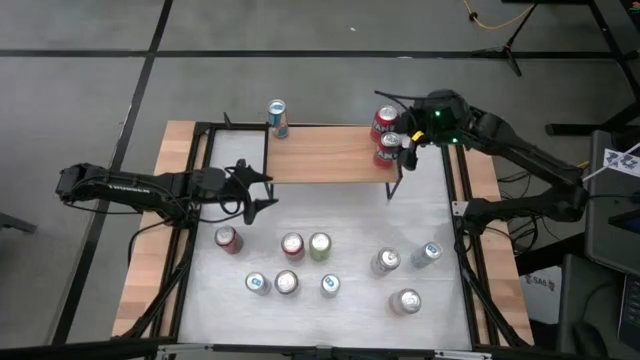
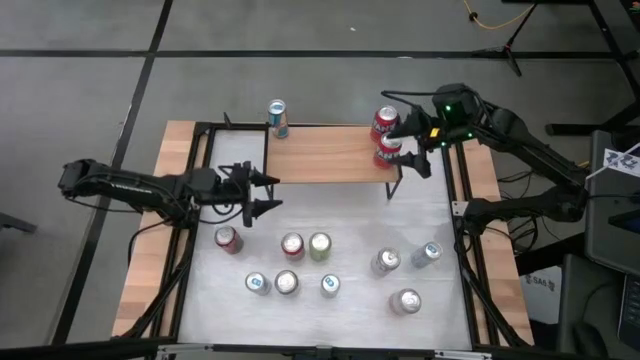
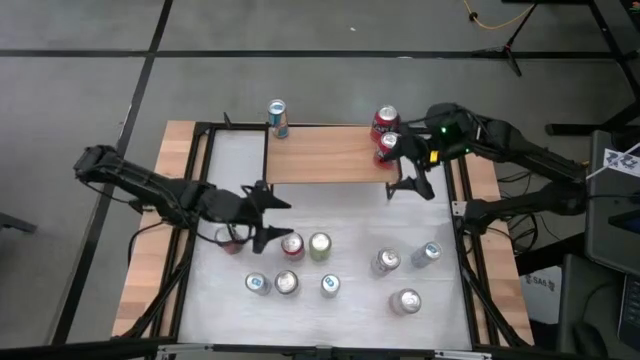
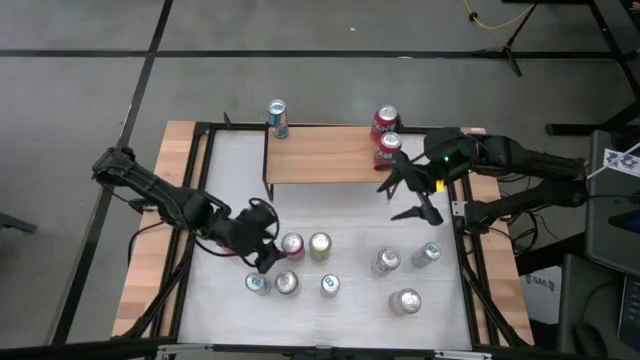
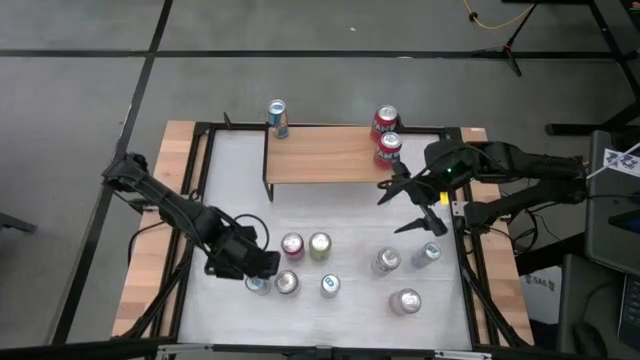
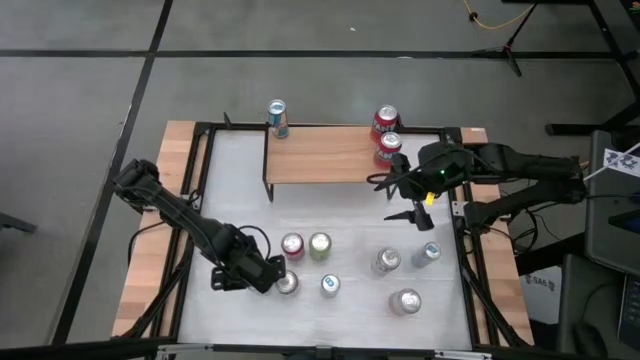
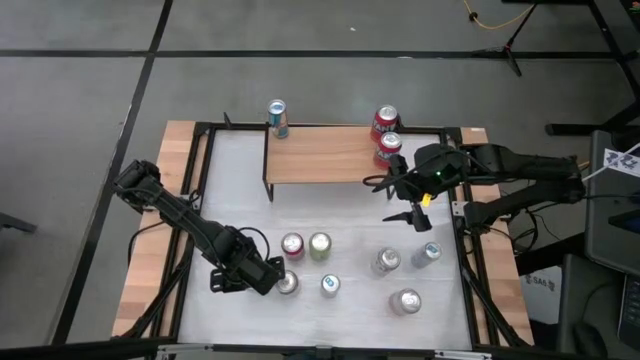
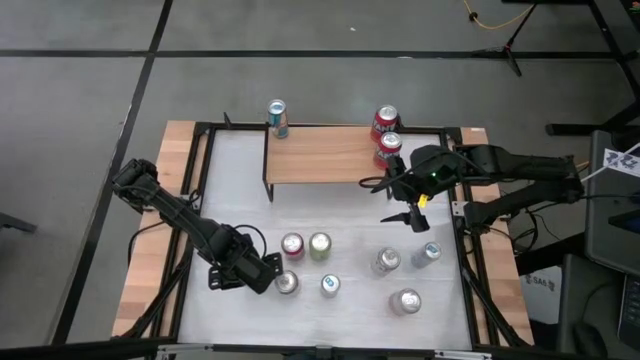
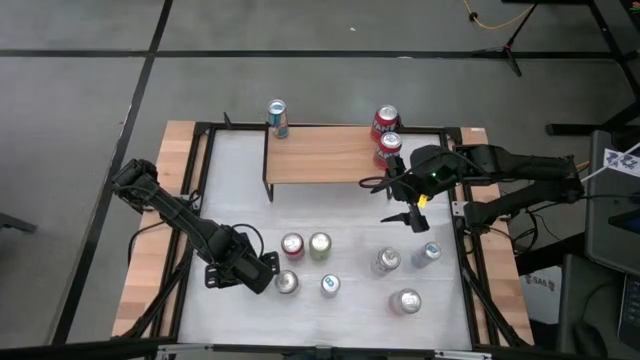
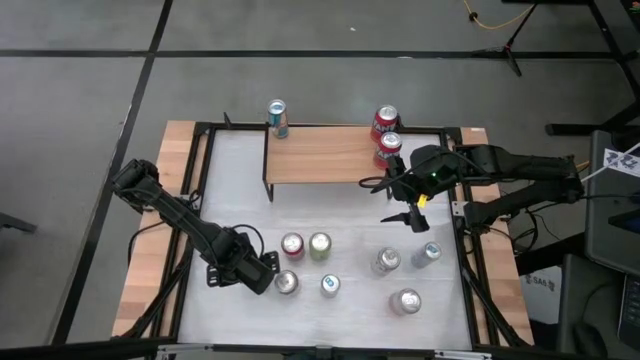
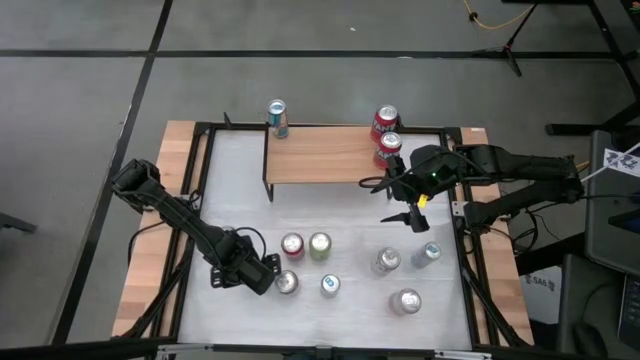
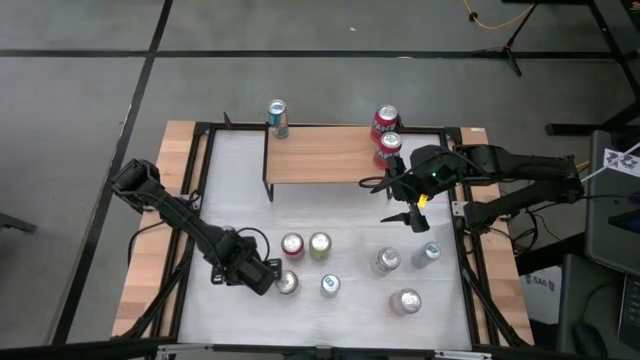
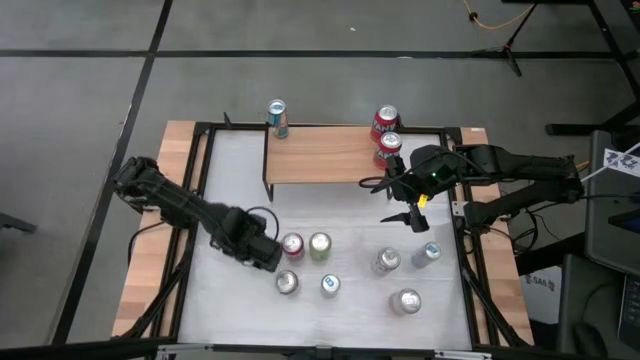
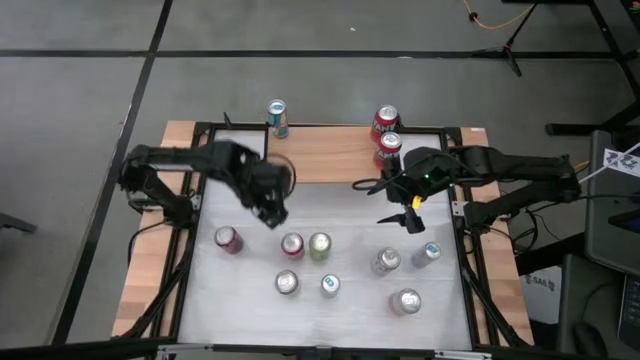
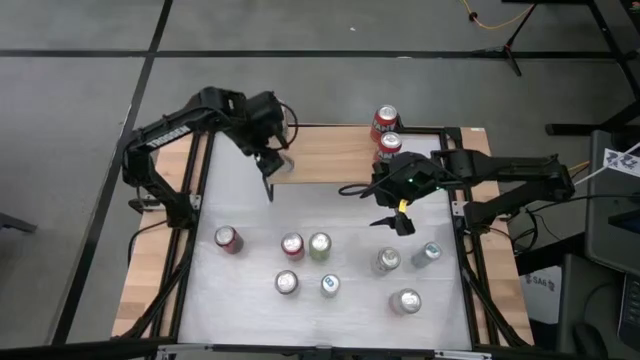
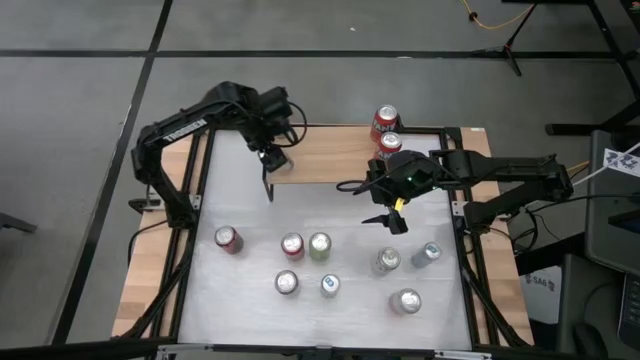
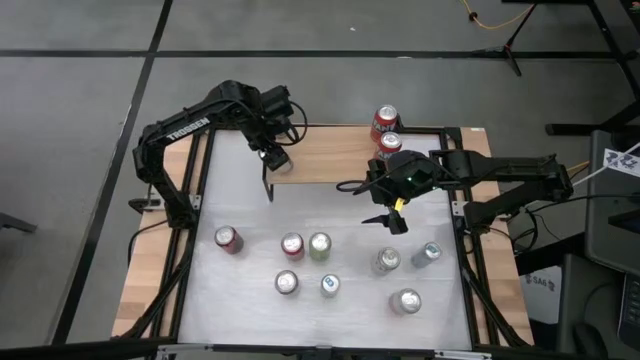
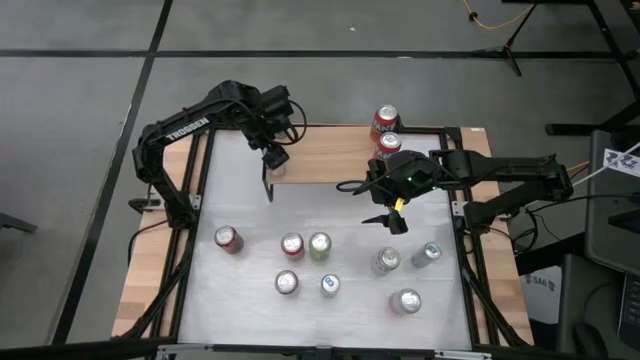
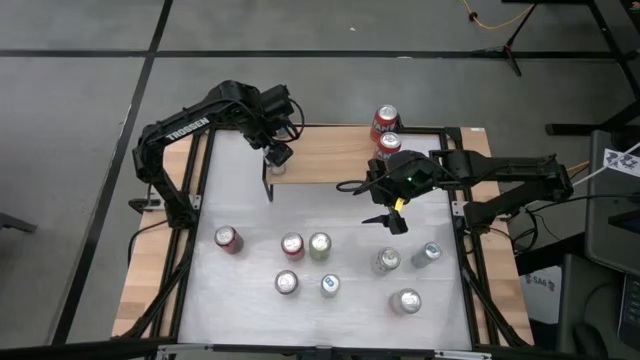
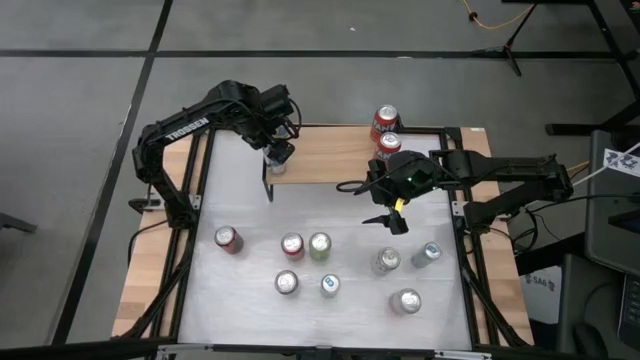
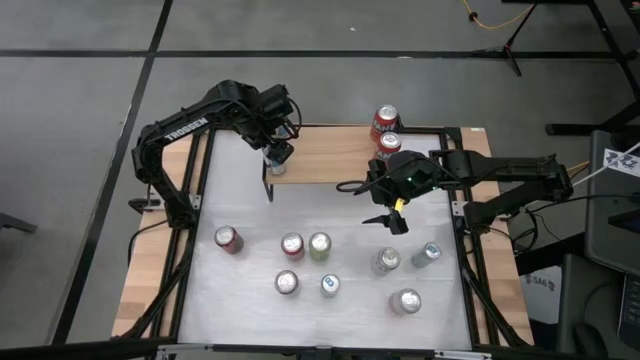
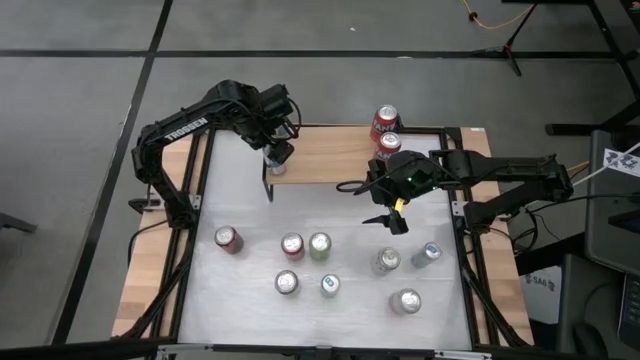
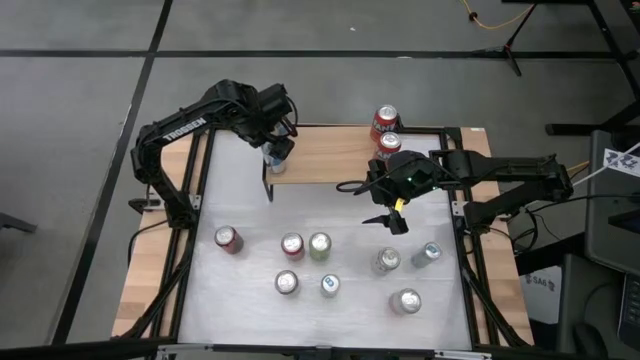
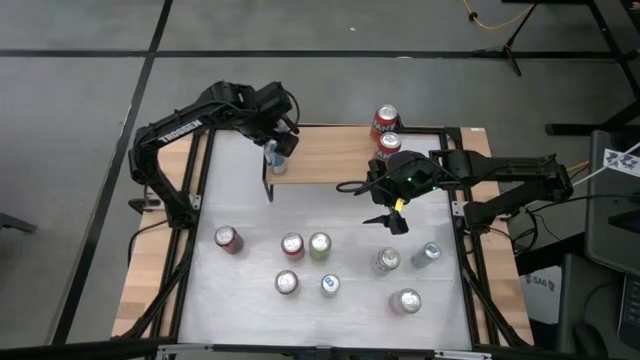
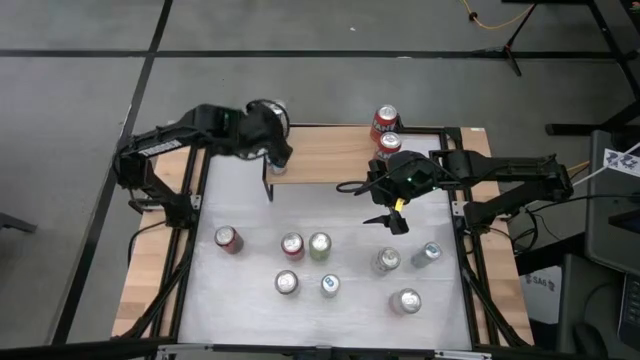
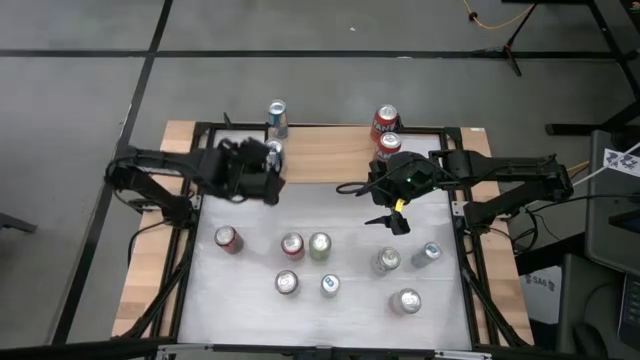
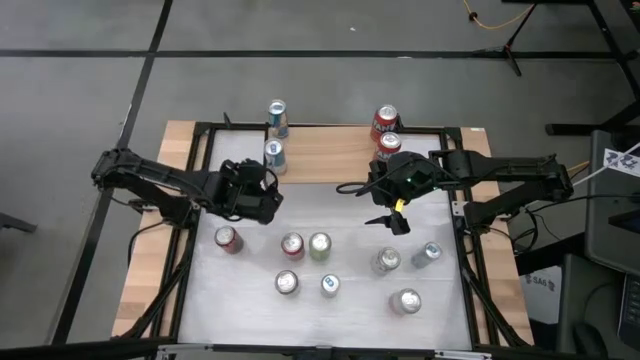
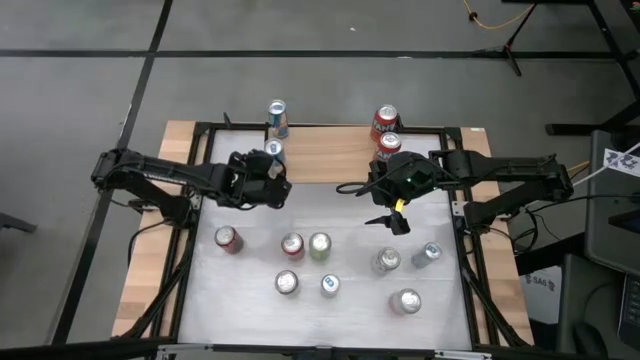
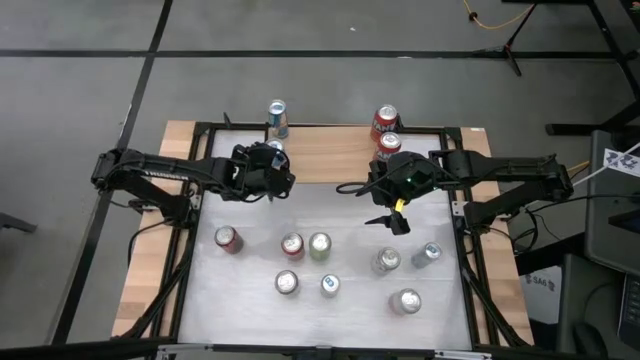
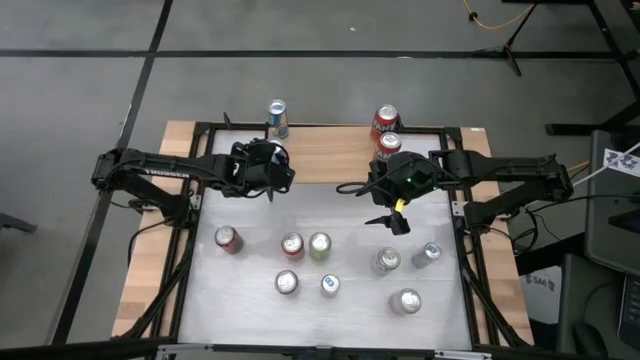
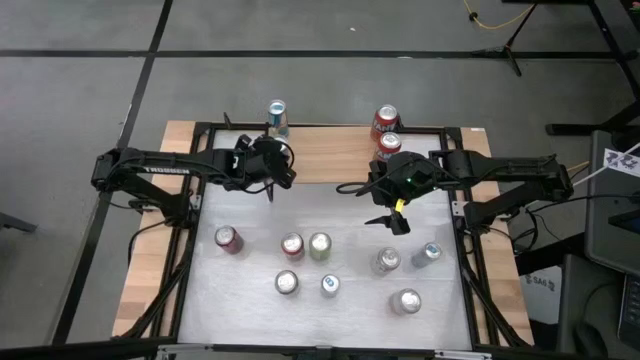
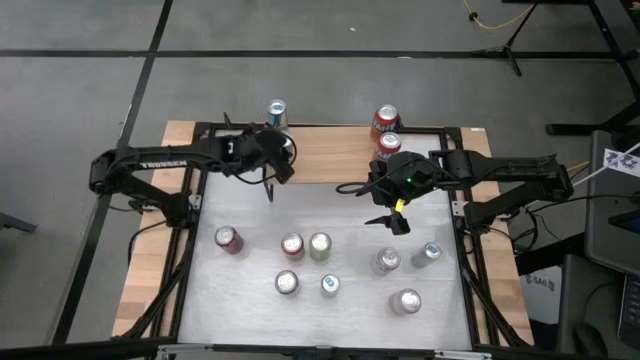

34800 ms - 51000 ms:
Task: Sort soda cans
Put the bottom left blue soda can on the shelf aligned with the blue soda can

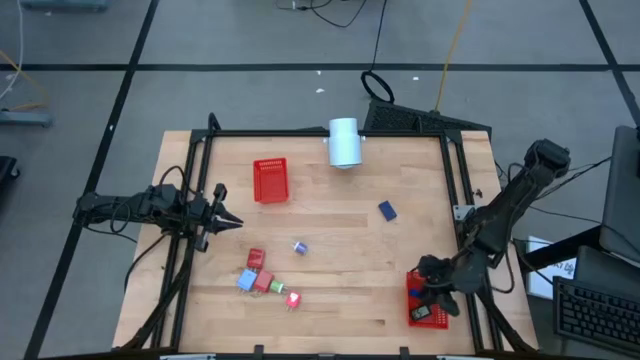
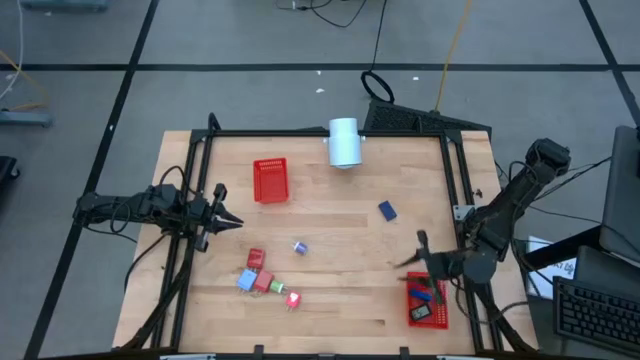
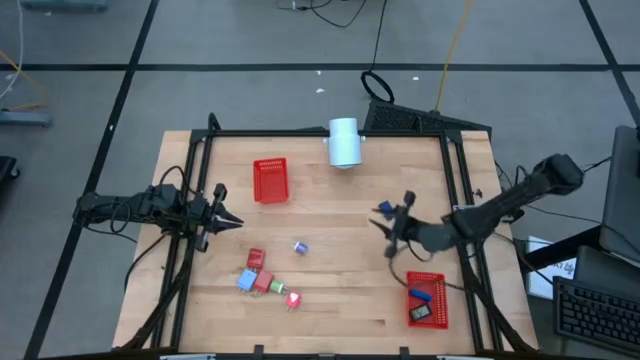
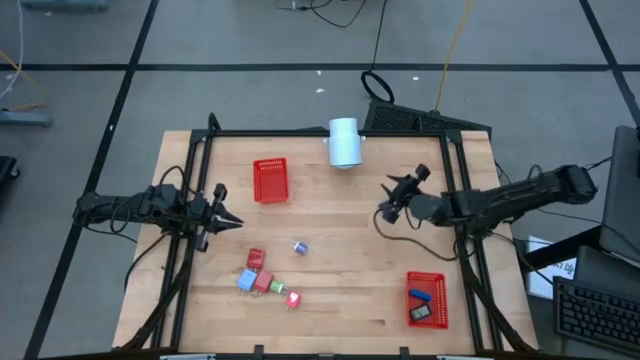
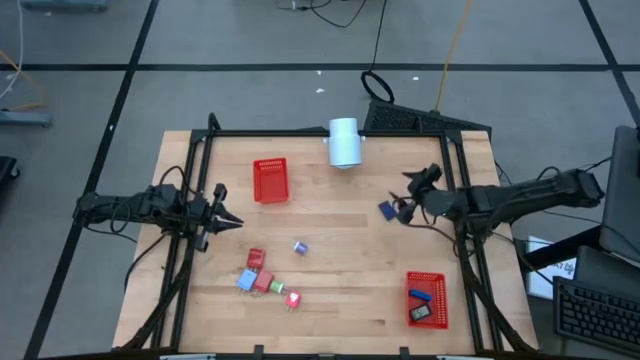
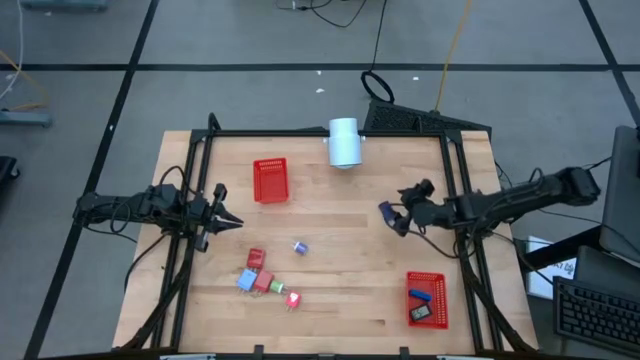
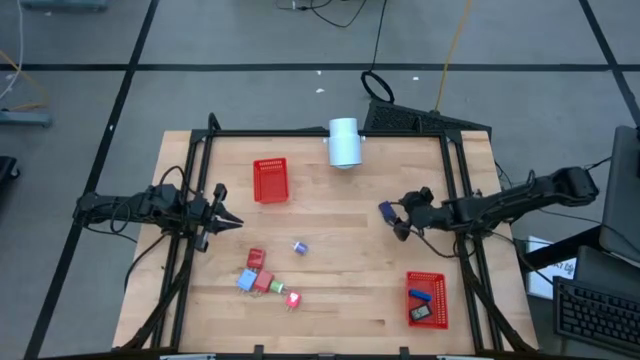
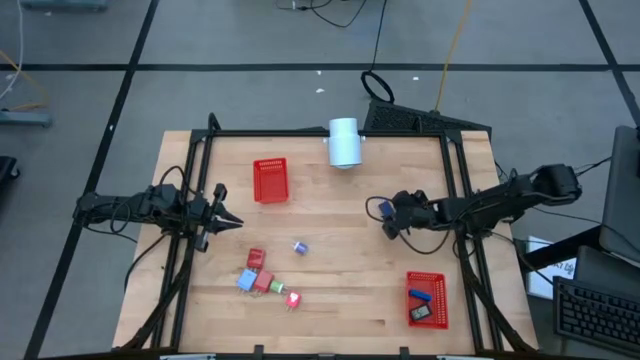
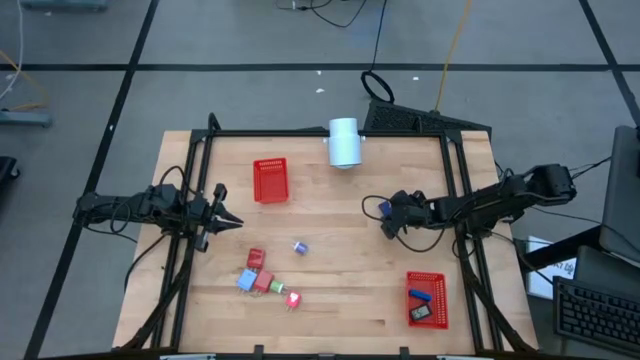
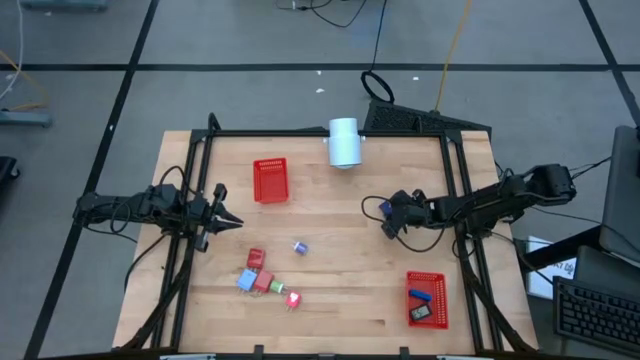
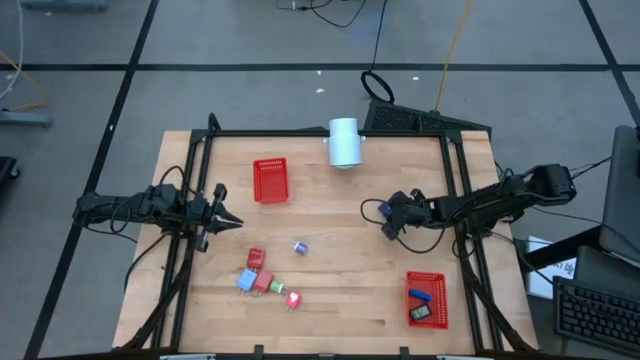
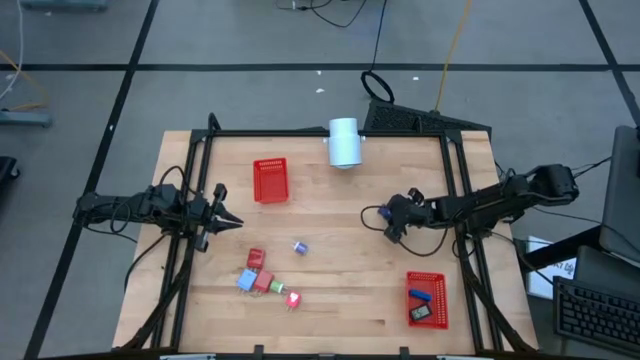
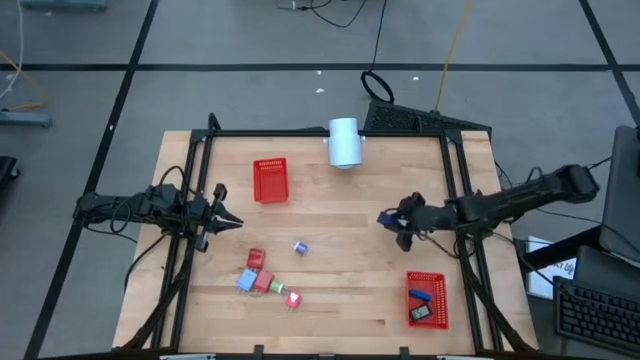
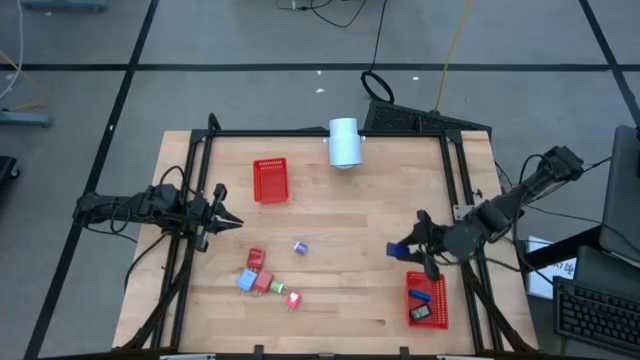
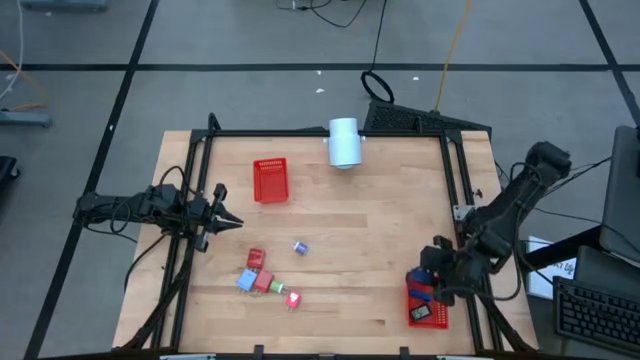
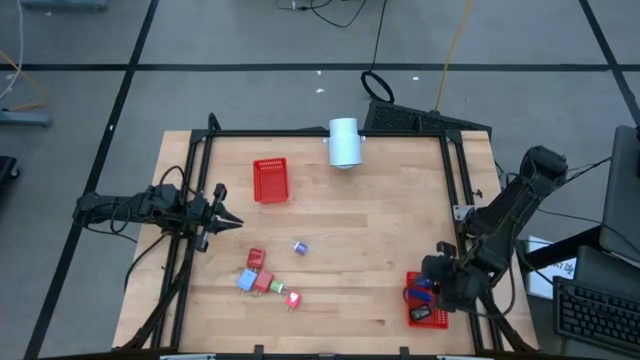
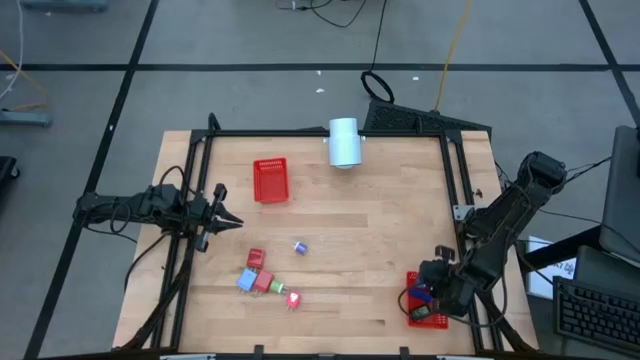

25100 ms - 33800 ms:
Task: Pick & Place Office items
Put the dark blue digital timer into the bottom red bin
